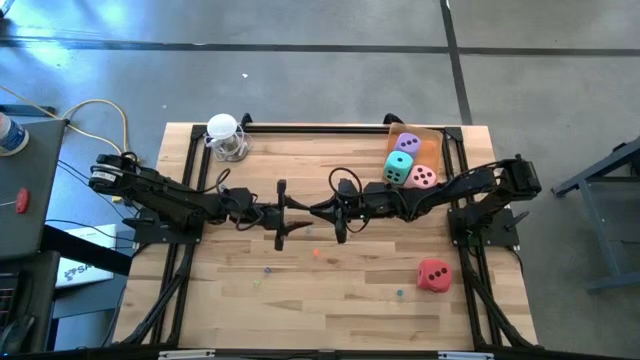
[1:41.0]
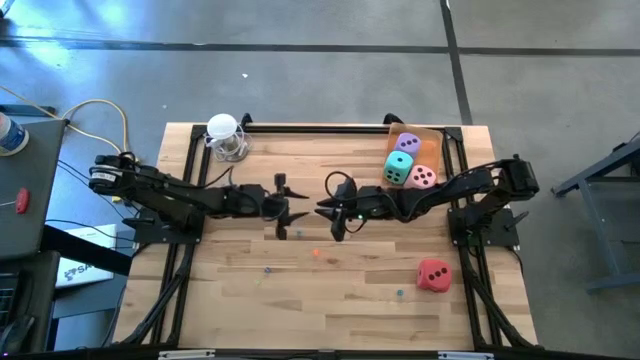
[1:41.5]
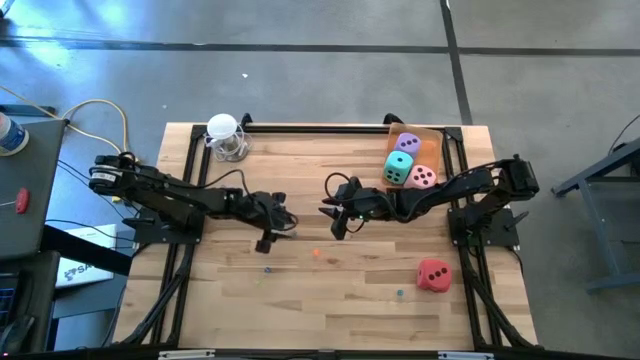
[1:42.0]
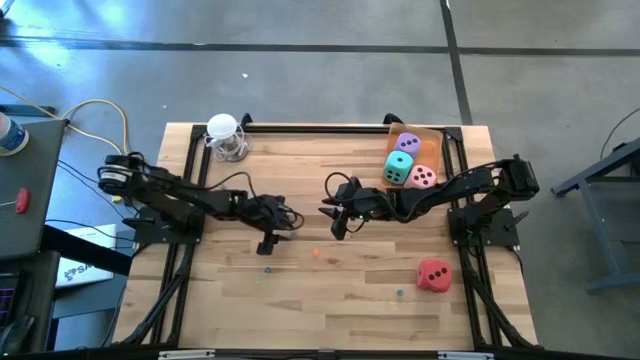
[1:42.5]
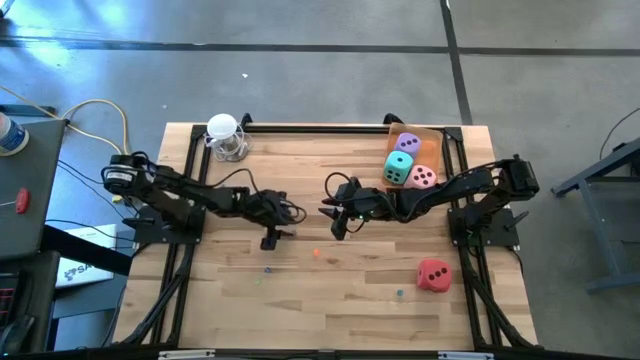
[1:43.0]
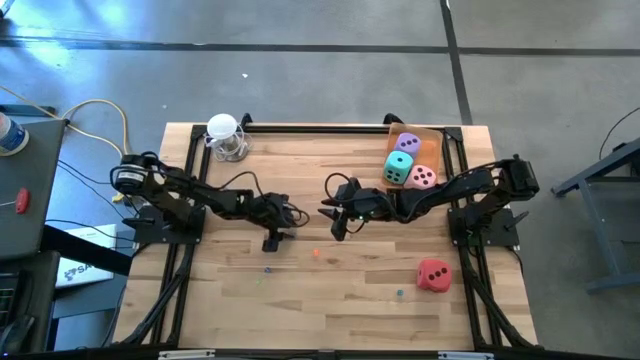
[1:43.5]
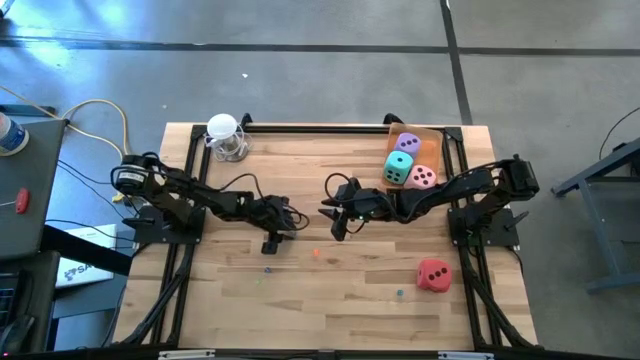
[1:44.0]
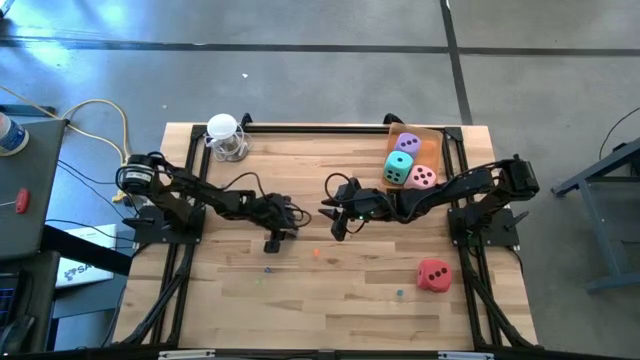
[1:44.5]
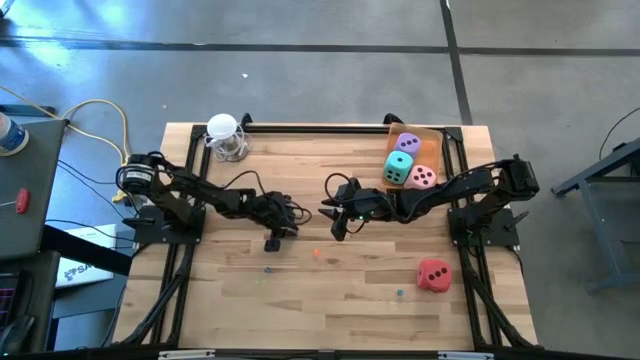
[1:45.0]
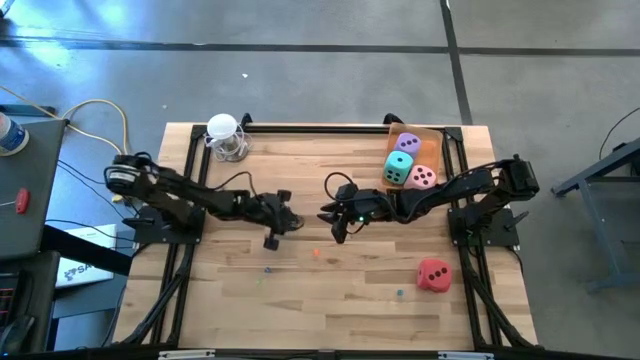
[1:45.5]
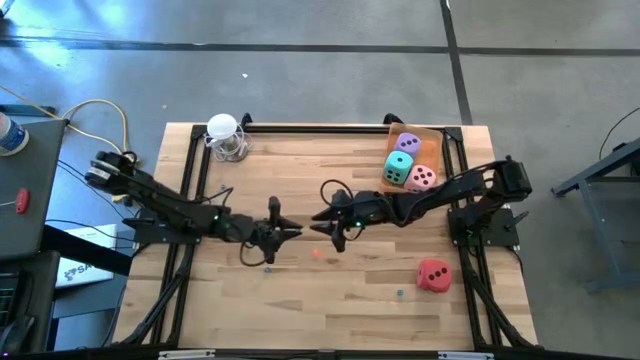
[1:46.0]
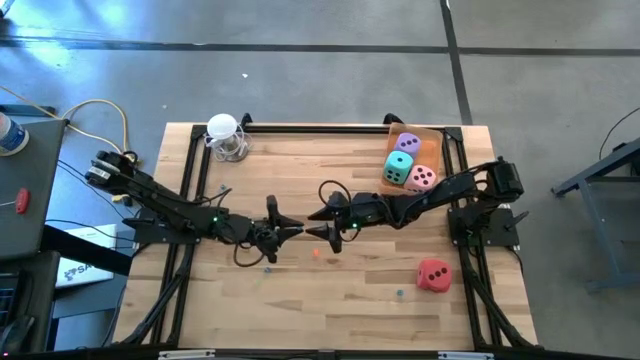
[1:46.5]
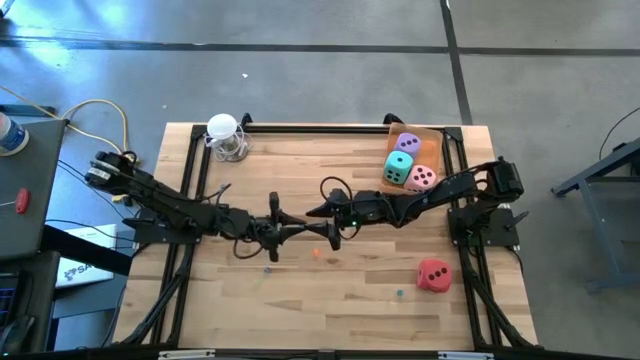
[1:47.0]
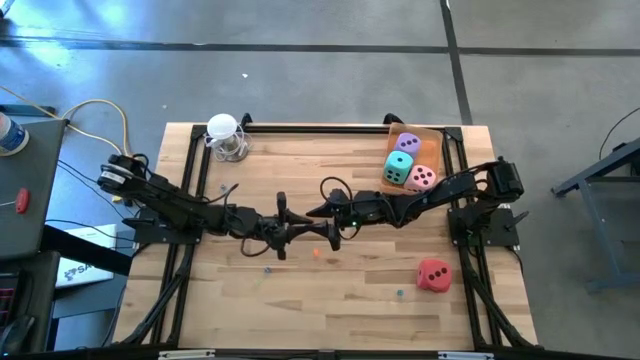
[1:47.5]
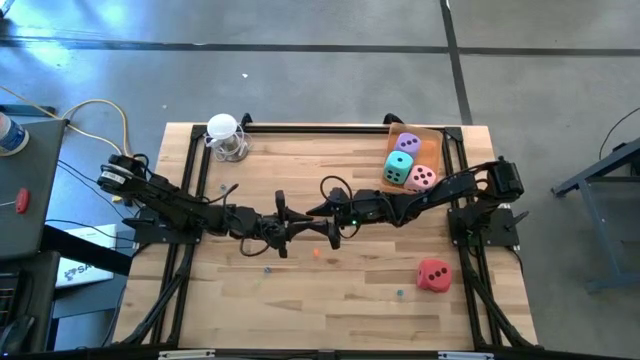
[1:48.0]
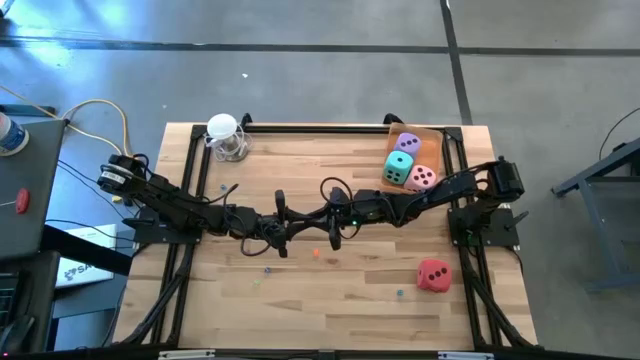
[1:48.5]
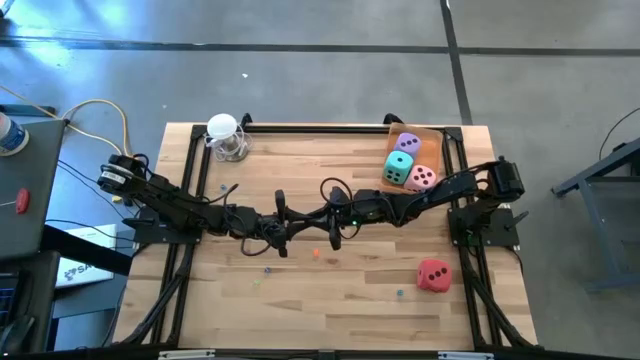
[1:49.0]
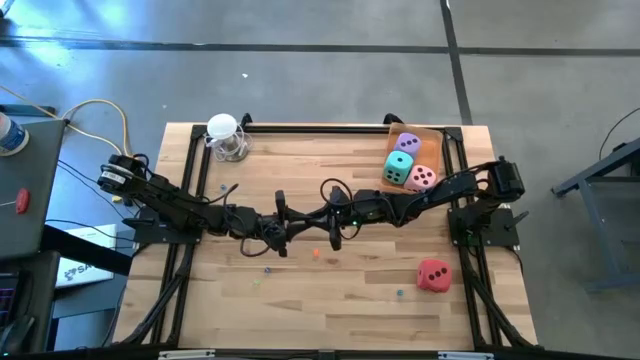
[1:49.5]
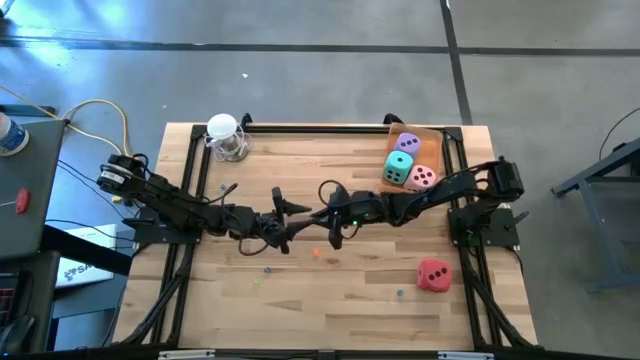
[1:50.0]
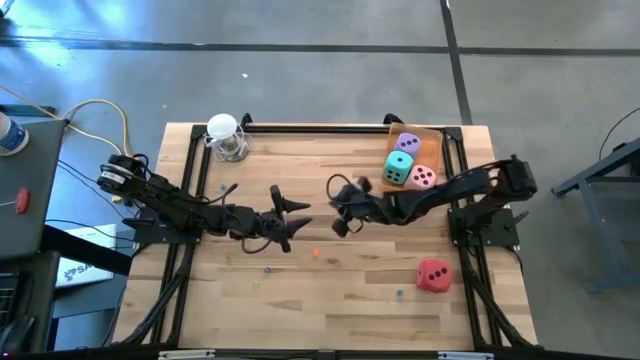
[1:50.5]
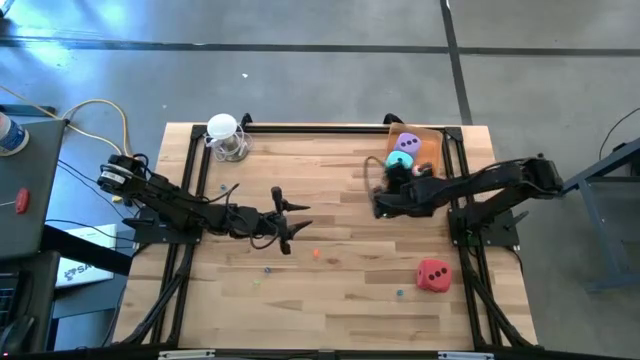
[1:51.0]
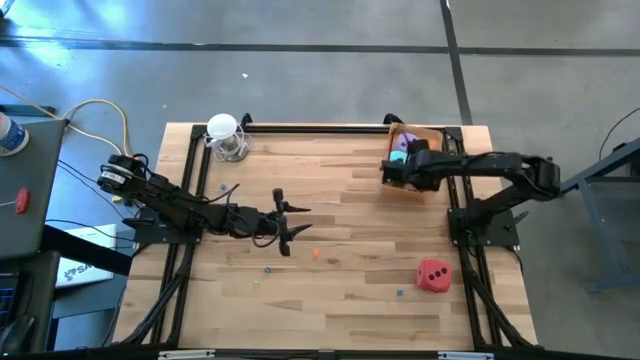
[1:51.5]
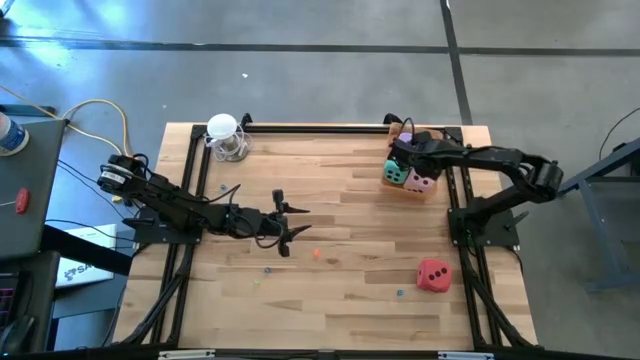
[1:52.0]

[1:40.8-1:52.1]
Task: Pick & Place Dice
Put the light blue small die into the orange bin

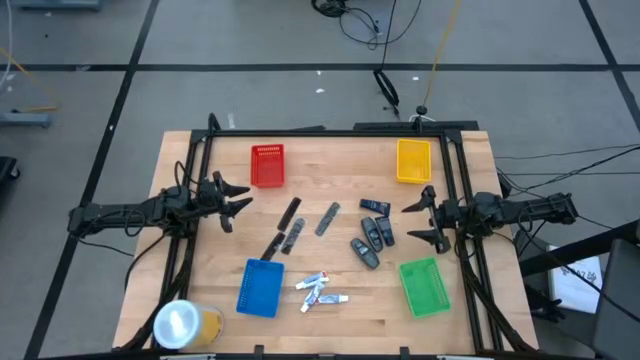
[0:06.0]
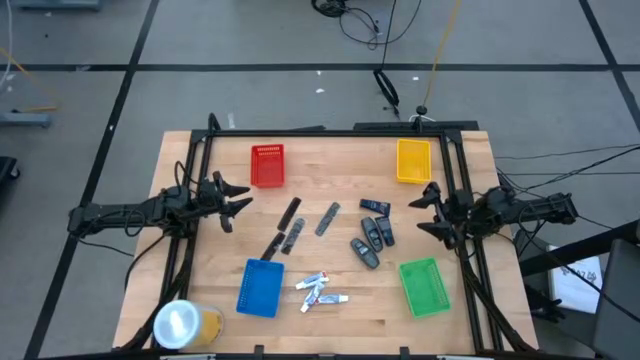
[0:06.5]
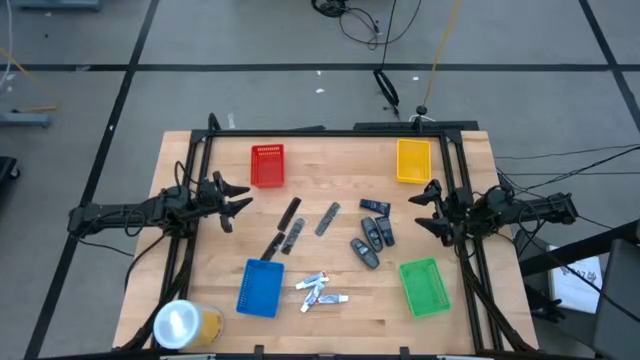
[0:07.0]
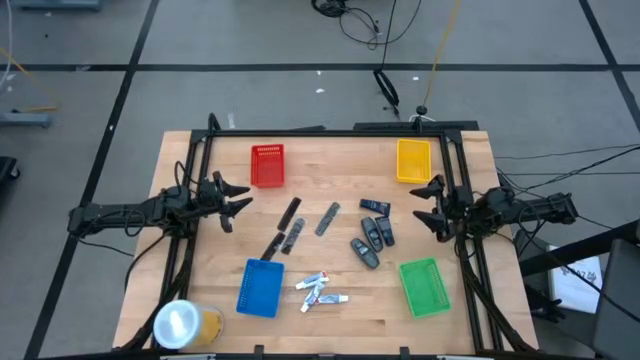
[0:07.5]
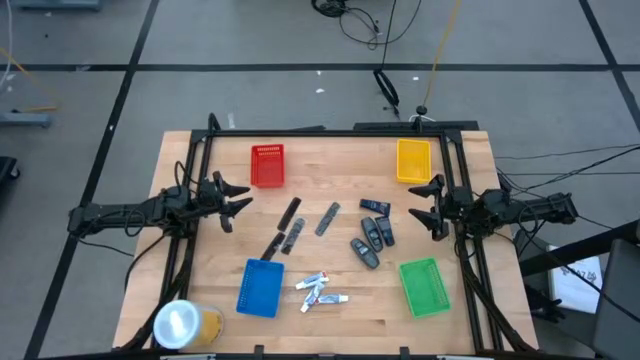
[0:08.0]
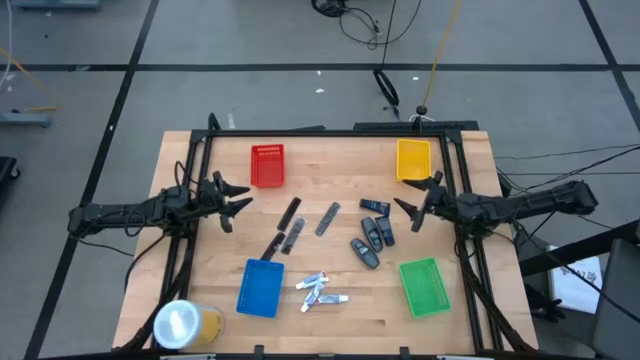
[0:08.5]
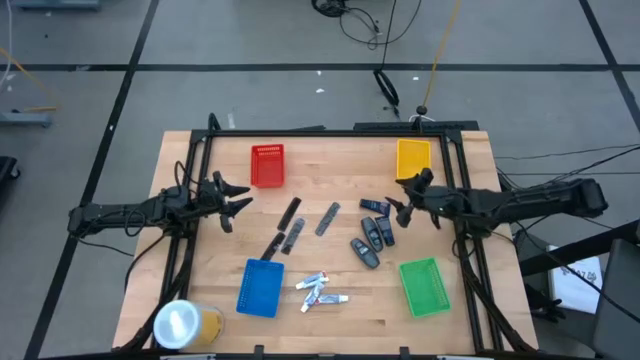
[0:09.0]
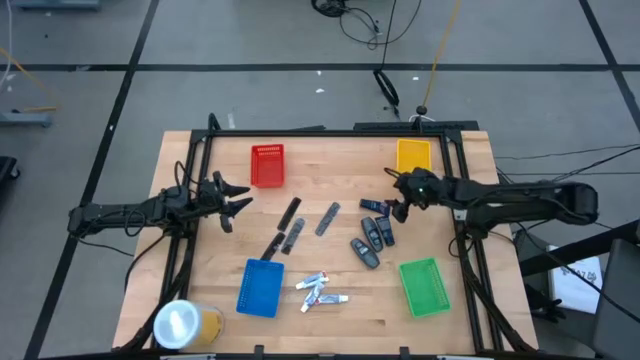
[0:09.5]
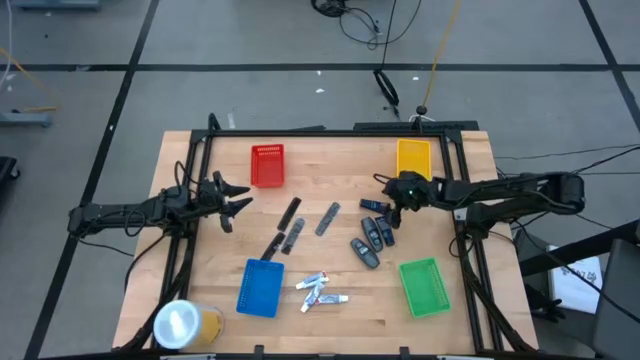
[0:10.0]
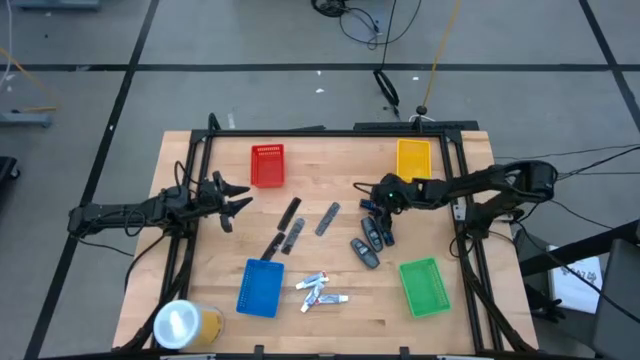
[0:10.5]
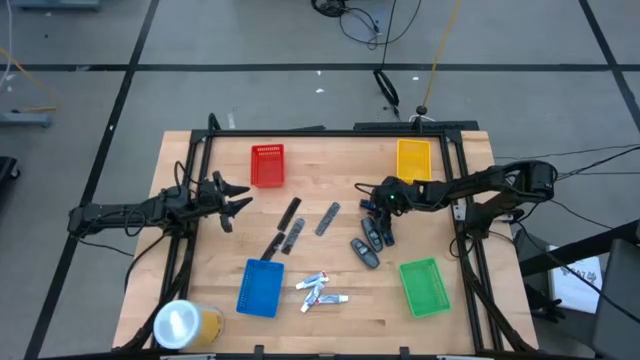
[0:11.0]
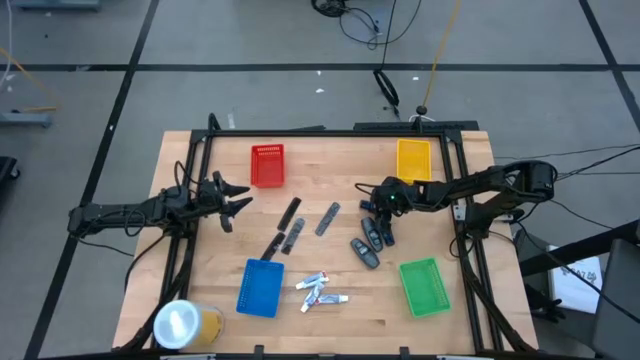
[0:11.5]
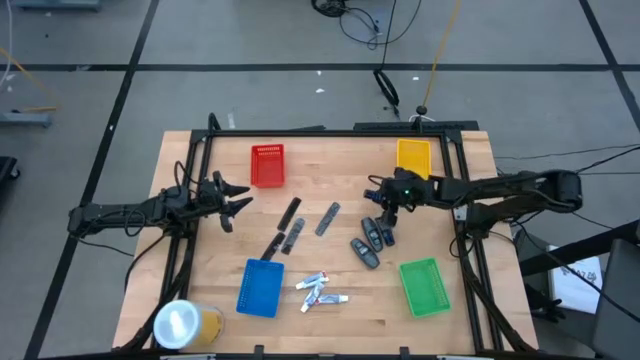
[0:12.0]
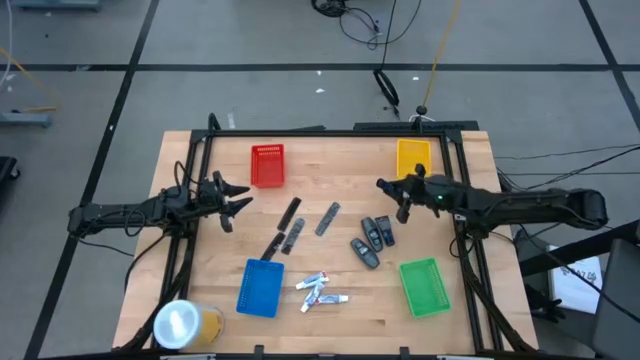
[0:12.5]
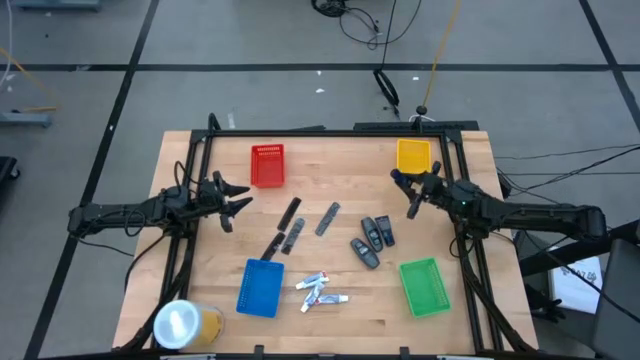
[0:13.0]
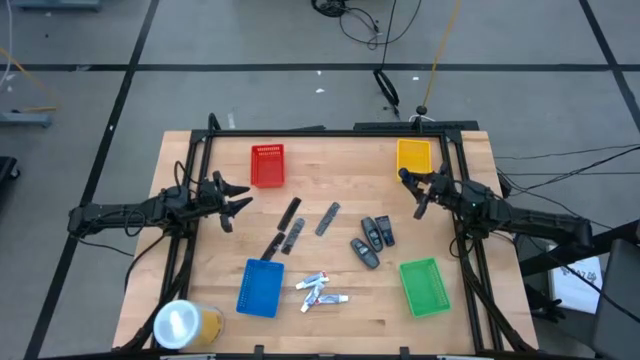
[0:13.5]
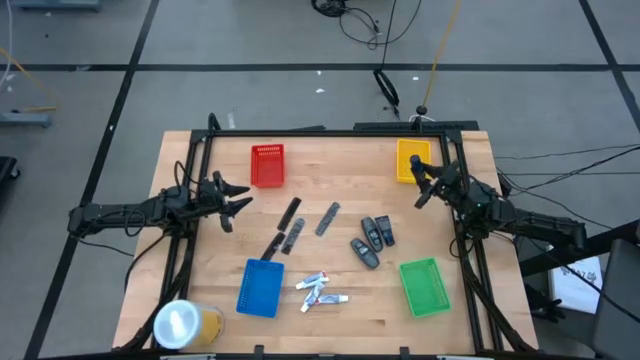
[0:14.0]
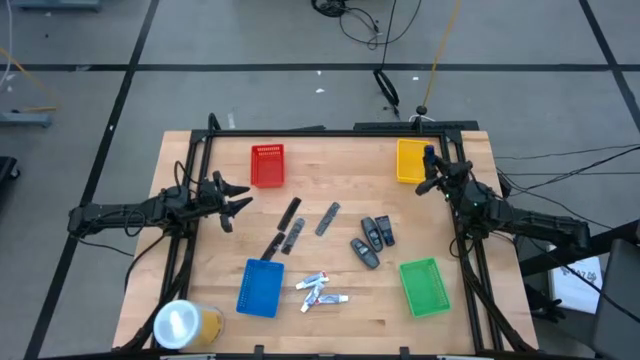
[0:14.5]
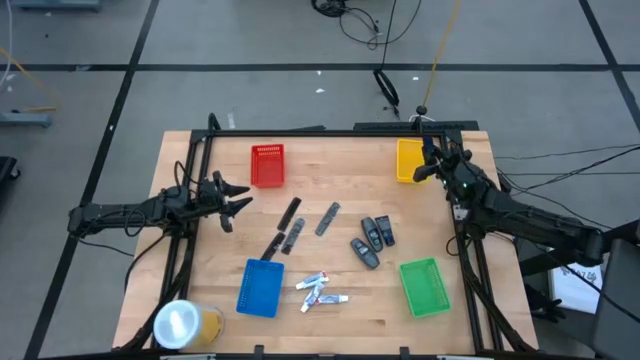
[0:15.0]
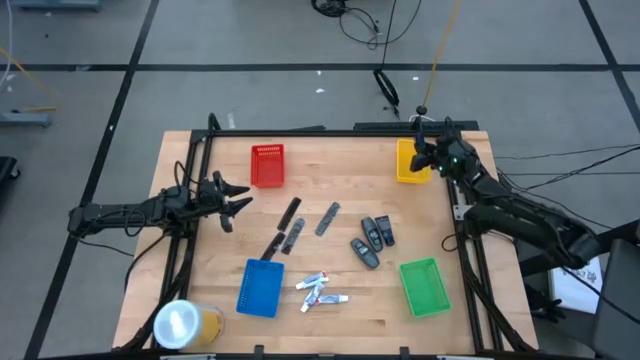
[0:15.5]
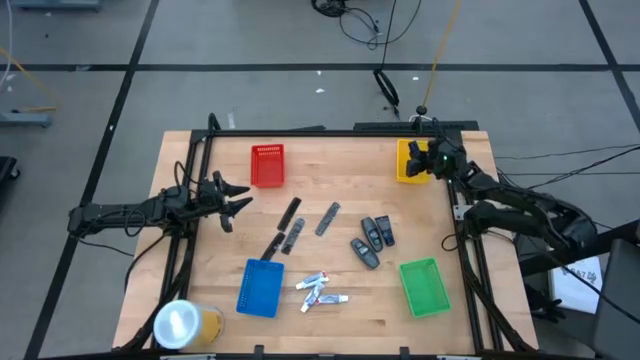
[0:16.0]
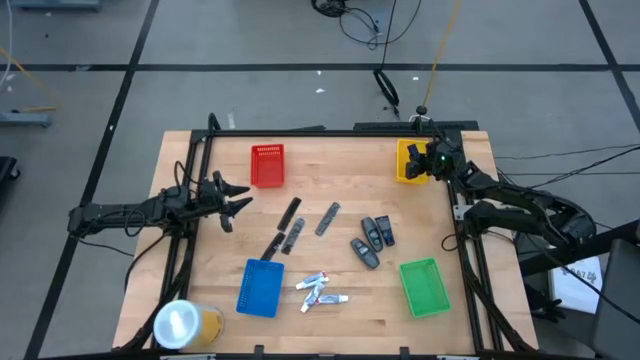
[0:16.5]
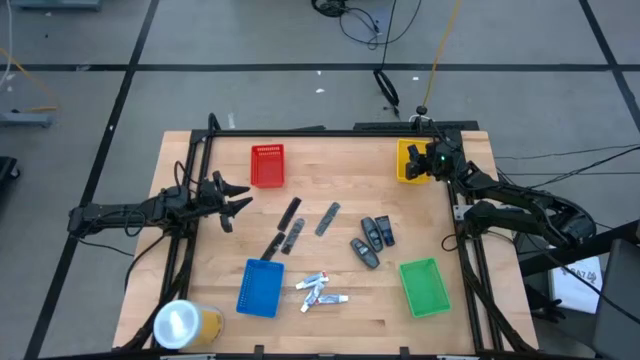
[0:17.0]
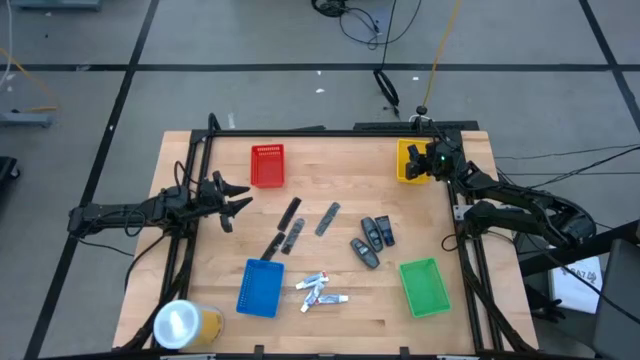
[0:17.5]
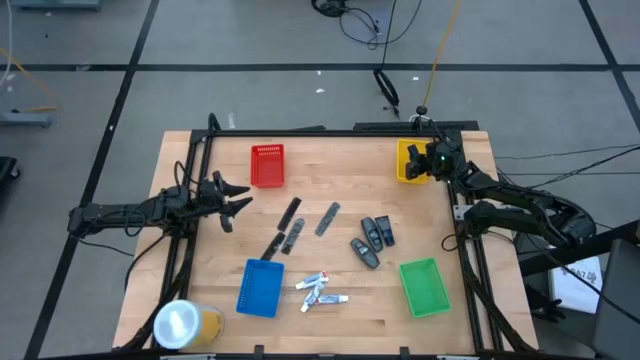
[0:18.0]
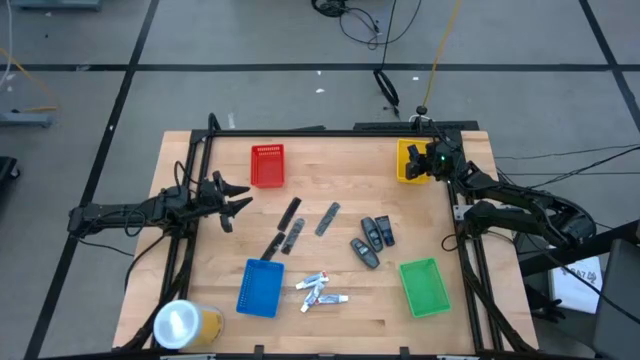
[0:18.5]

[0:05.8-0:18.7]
Task: Pick & Place Travel size toiletries
Put the top blue shave cream into the yellow basket
